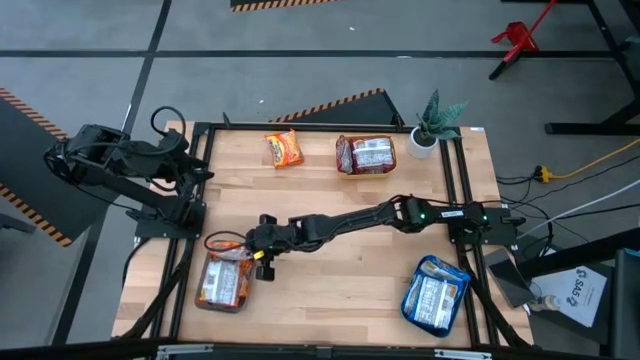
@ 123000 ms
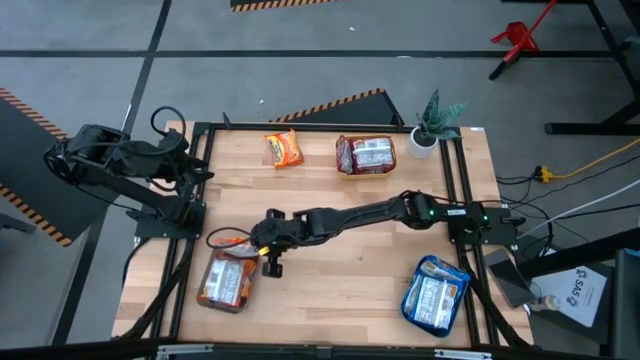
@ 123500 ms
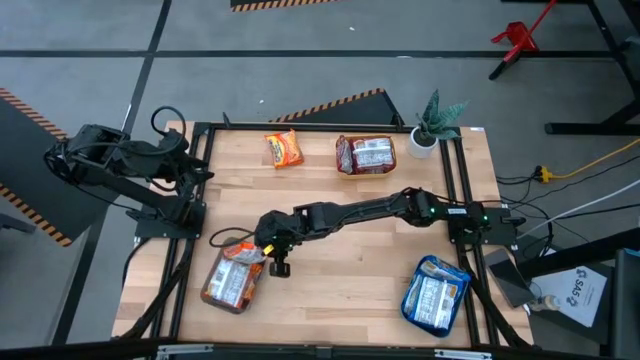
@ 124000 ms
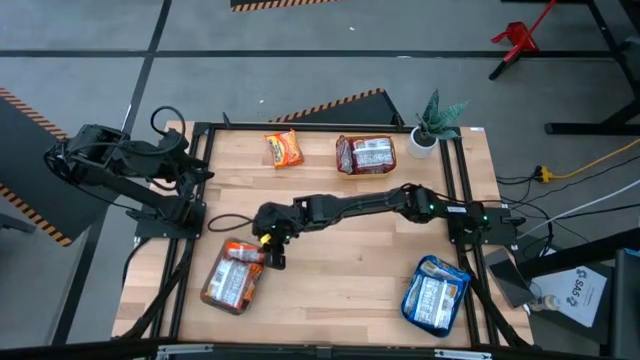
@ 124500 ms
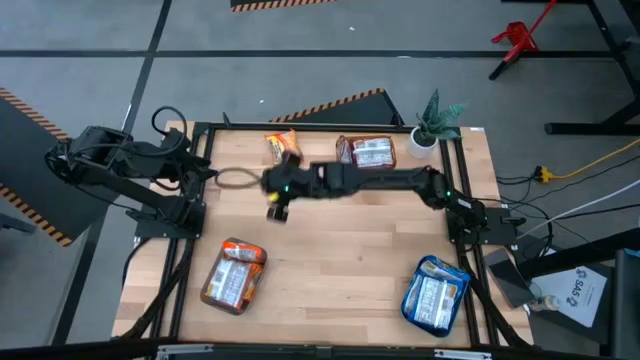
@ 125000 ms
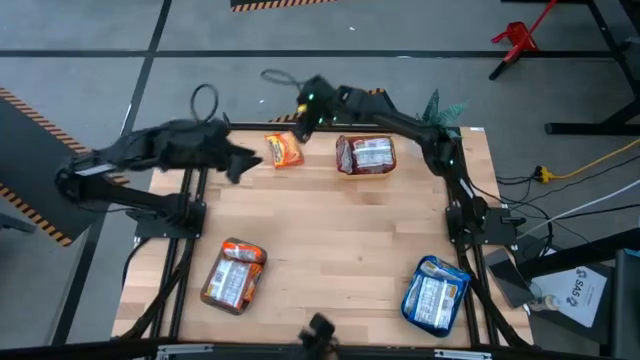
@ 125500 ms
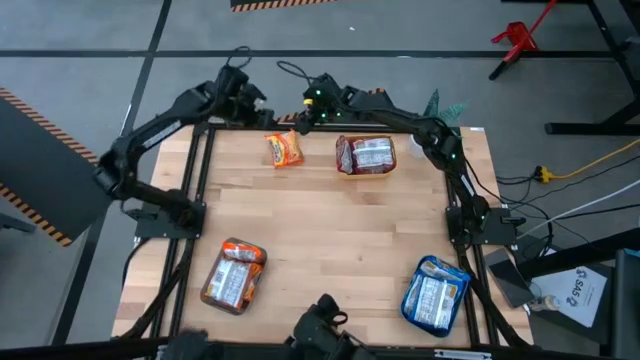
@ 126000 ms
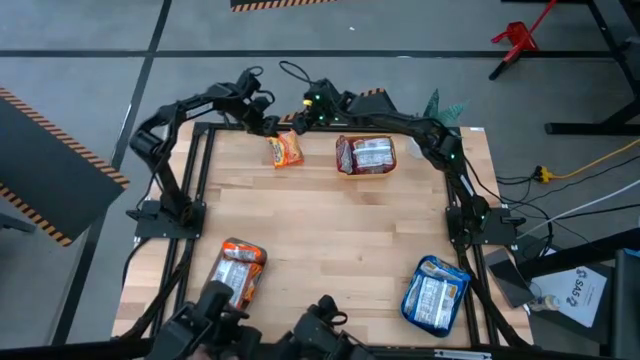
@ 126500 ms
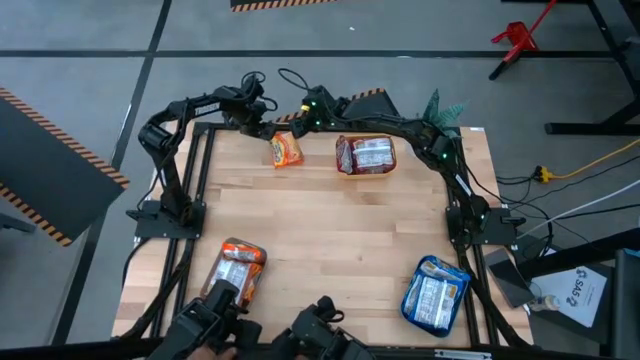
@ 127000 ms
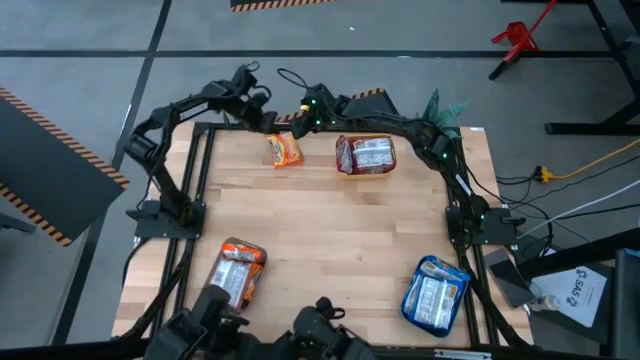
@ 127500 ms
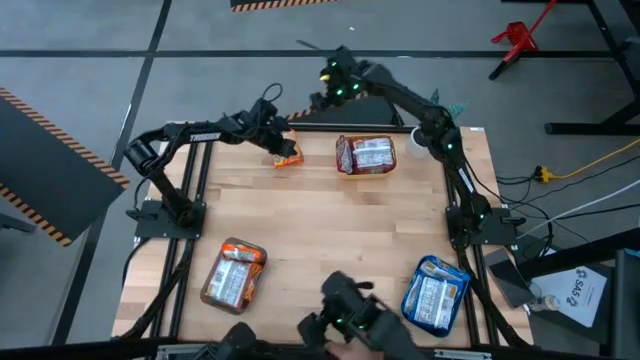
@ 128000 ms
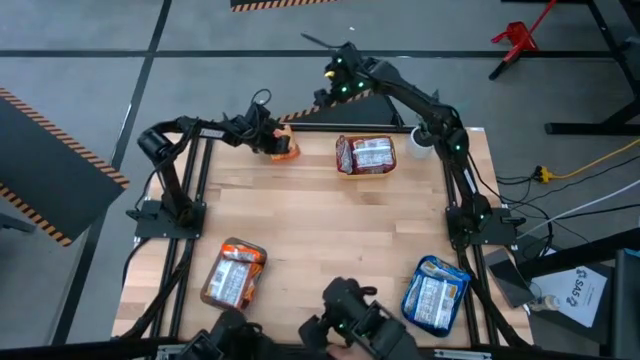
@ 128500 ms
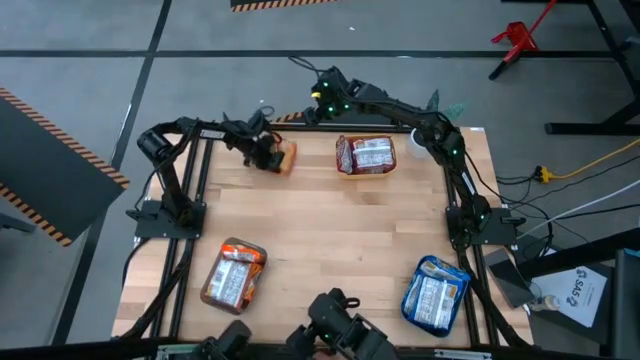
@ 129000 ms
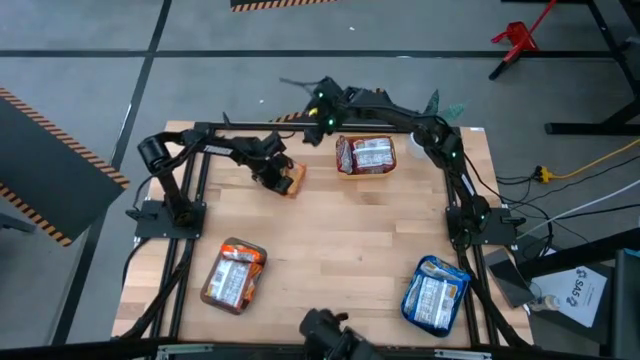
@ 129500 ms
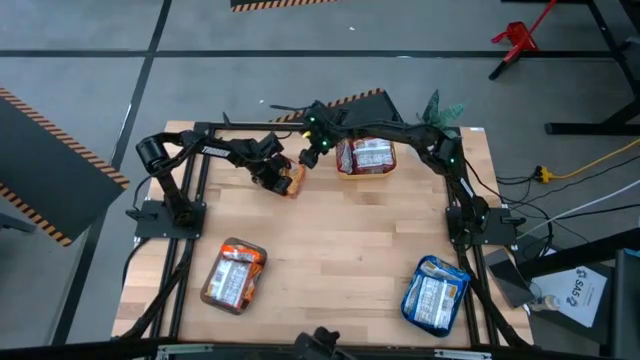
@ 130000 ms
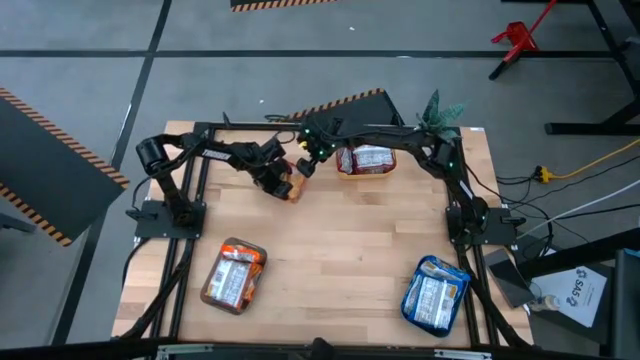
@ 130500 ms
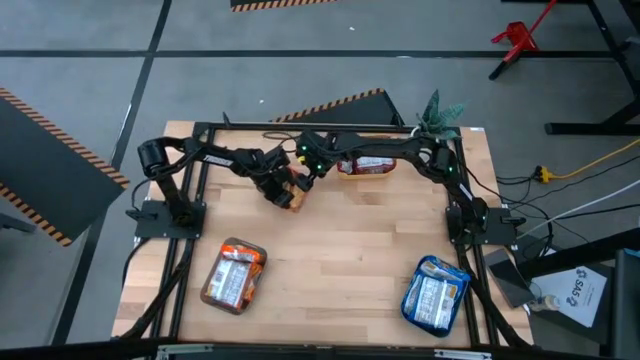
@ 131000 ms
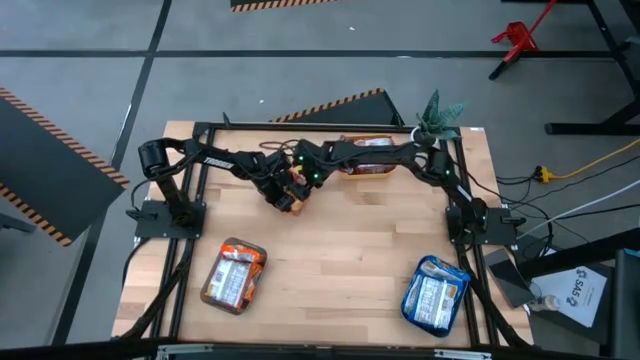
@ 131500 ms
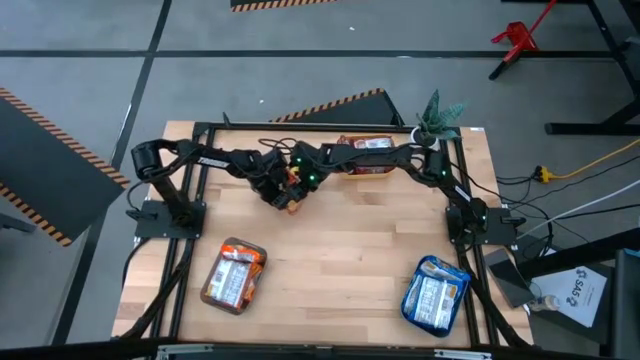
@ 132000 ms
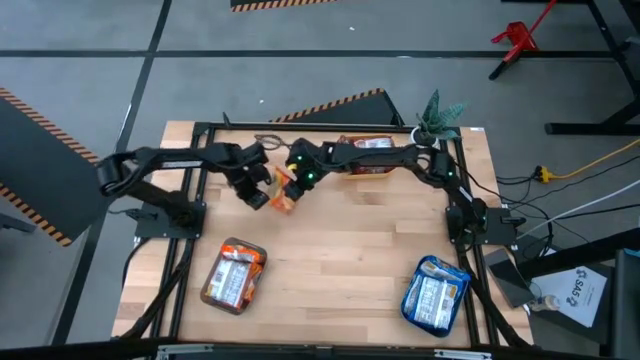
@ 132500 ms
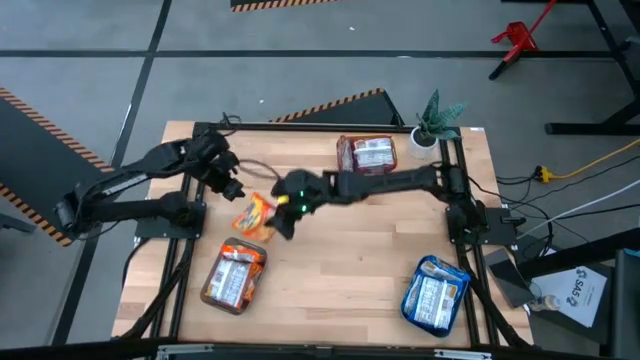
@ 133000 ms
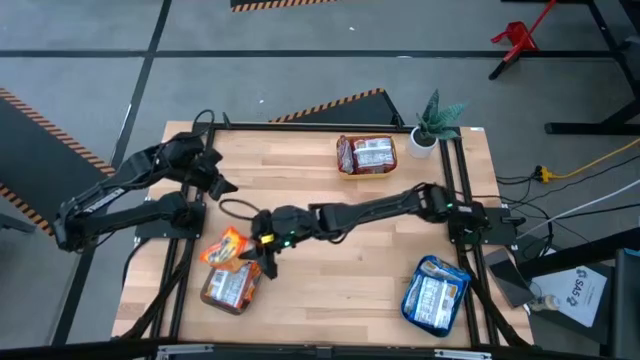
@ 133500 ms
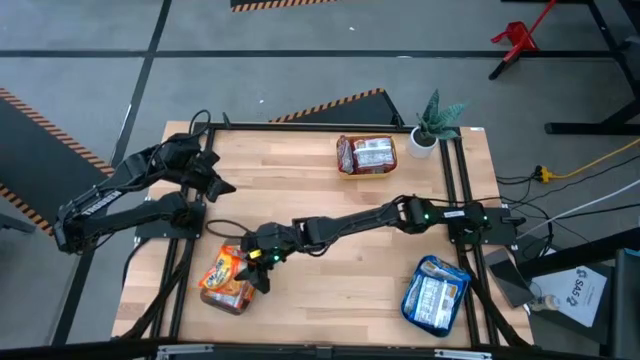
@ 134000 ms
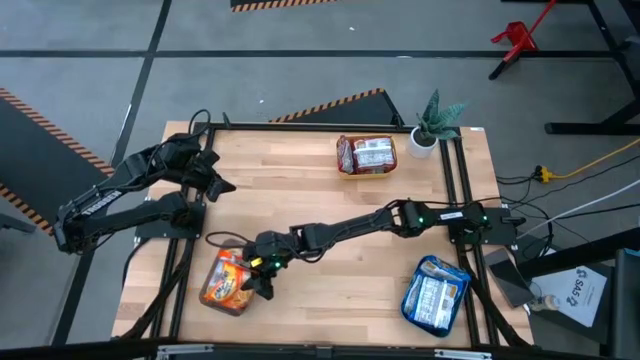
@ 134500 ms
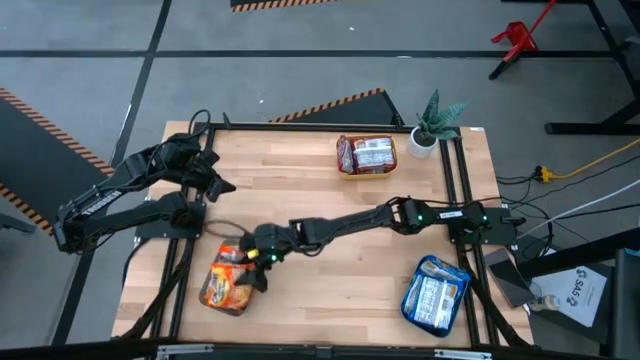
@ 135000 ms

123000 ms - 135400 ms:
Task: Sort Maruchan noodles
Put the orange noodle pack into the black bin

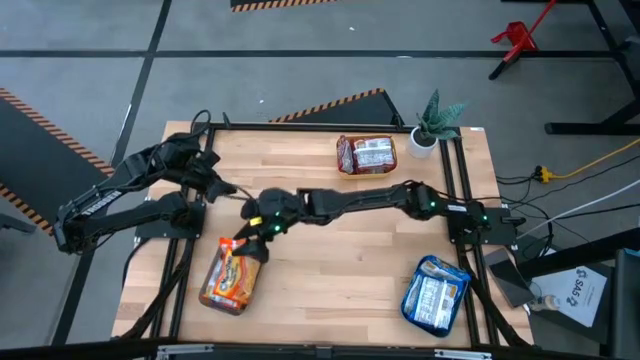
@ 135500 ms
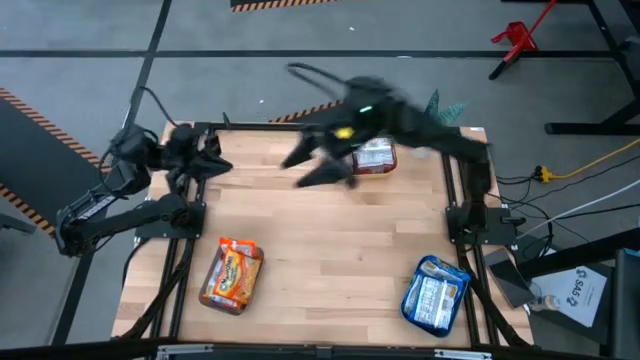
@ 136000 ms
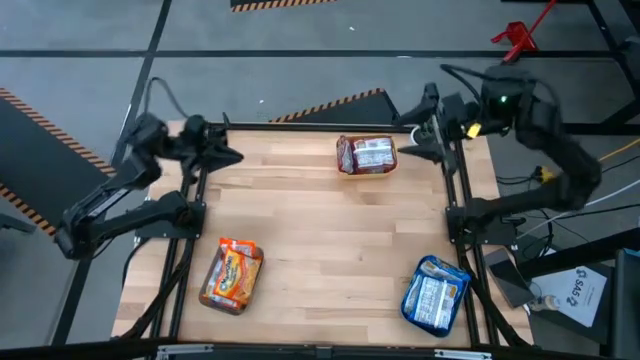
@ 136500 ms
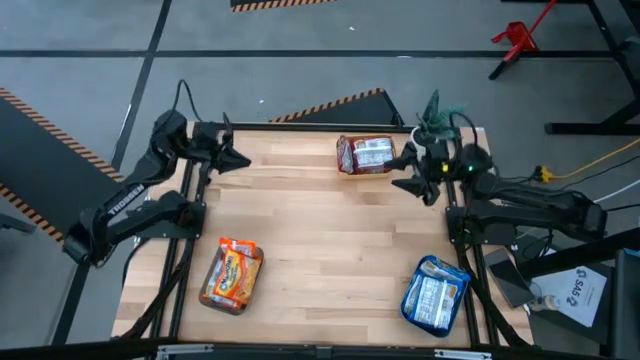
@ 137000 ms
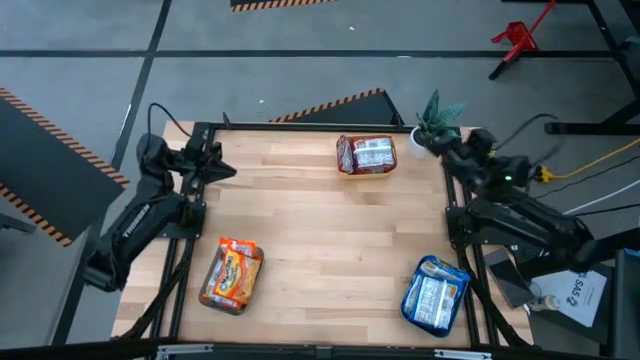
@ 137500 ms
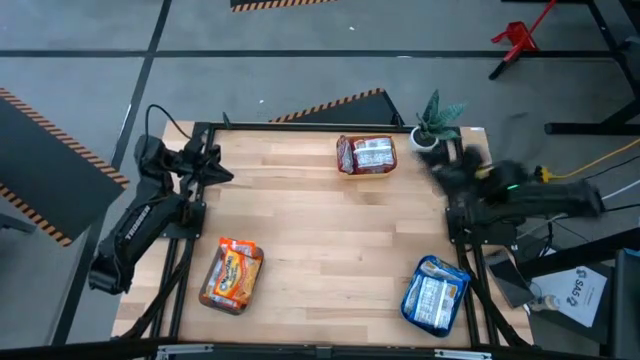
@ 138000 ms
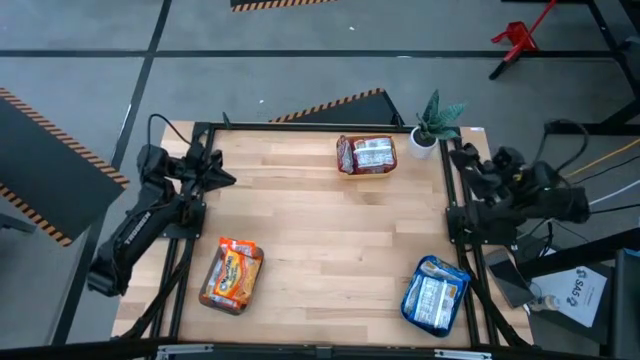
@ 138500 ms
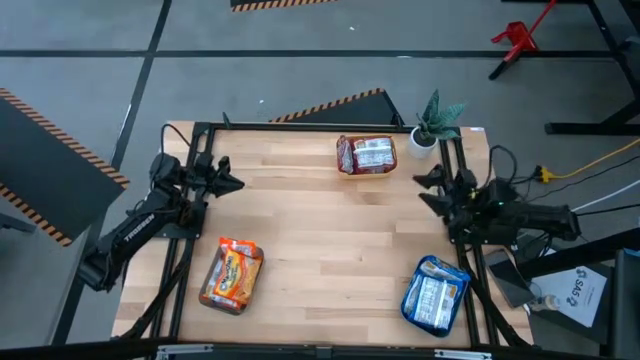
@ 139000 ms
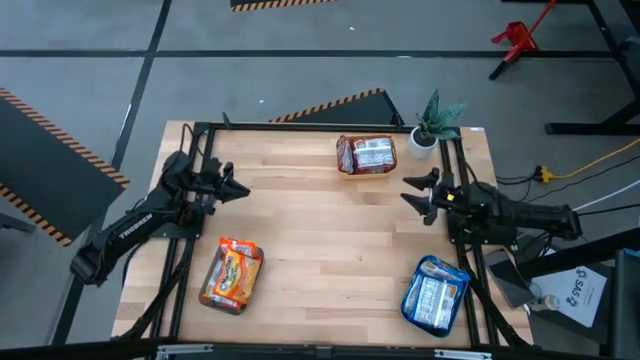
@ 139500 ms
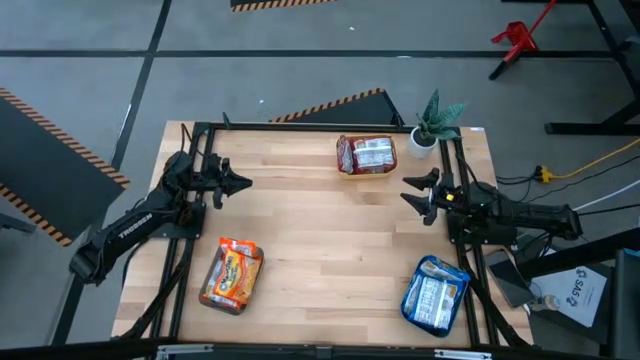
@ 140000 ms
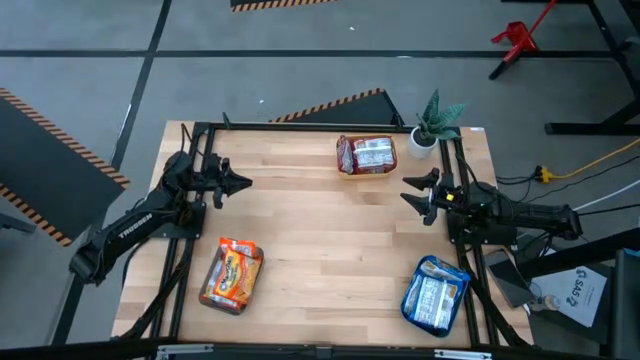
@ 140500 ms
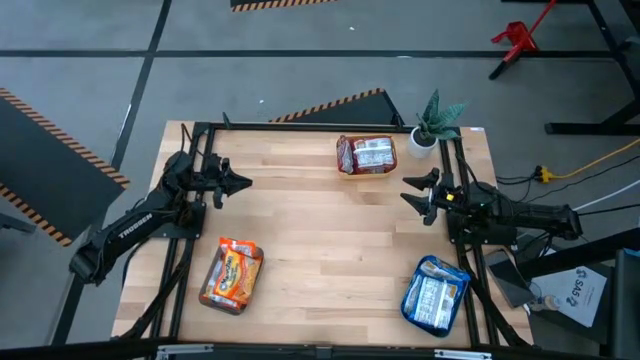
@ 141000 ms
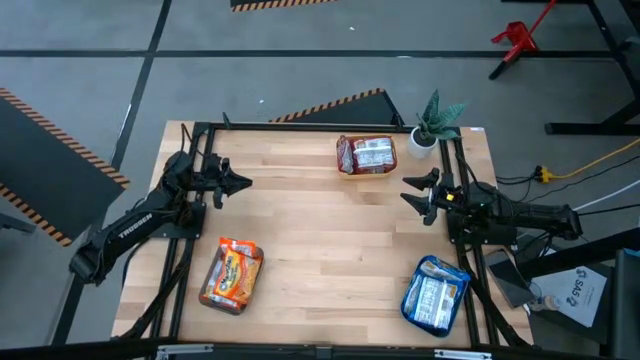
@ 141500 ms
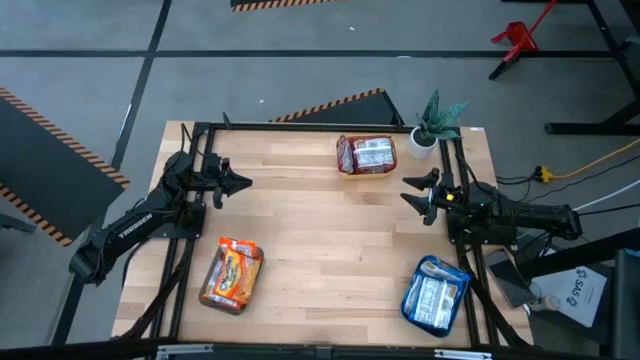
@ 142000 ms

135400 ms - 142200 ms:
Return to Home Position

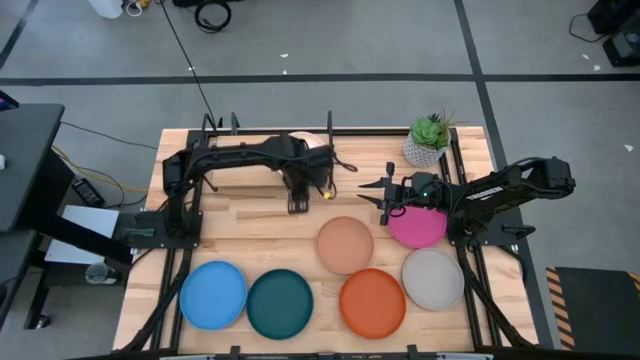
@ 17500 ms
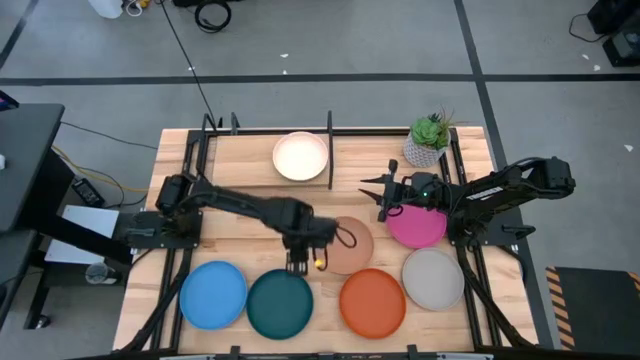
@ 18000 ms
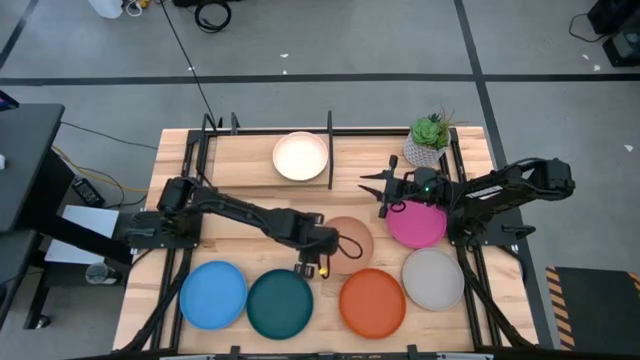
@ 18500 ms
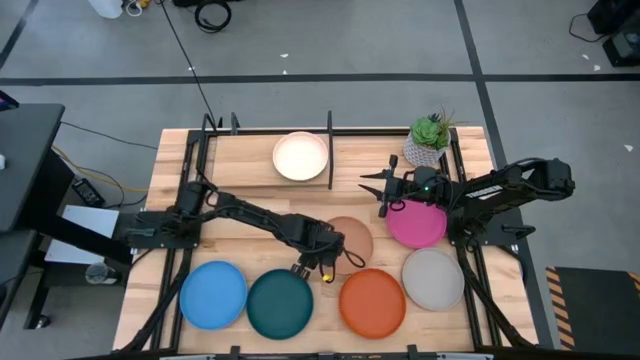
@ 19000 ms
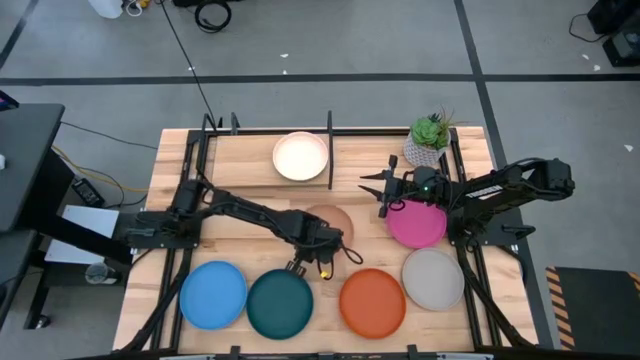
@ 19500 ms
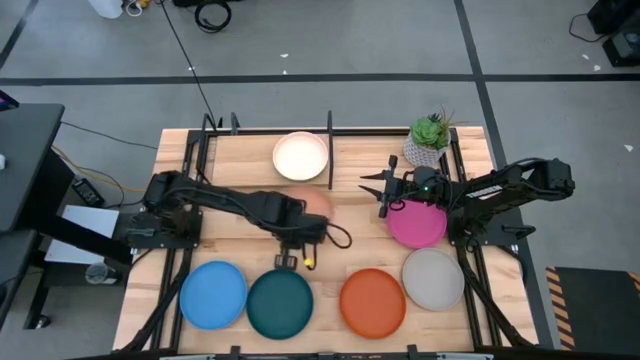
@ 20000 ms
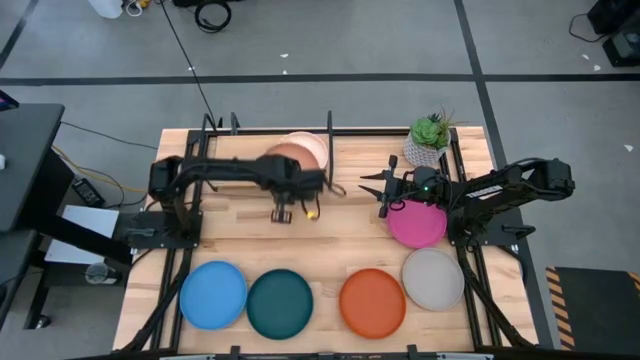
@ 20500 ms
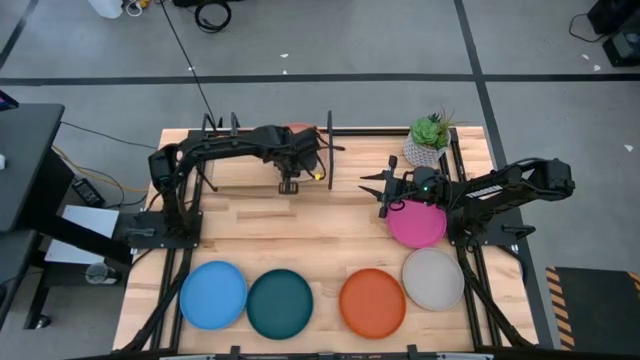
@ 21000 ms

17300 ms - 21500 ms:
Task: Place and stack plates onto a shelf
Stack the brown plate on top of the white plate on the shelf
